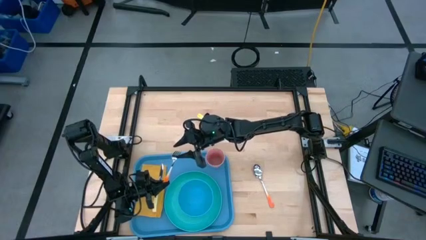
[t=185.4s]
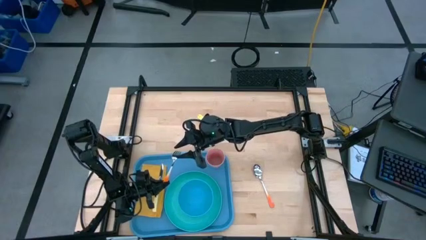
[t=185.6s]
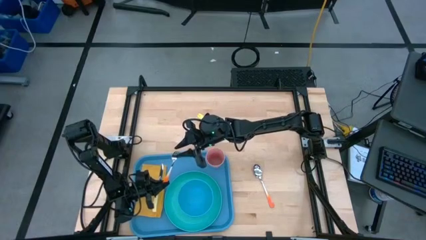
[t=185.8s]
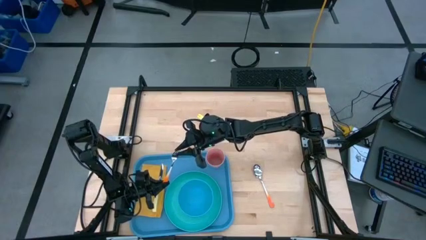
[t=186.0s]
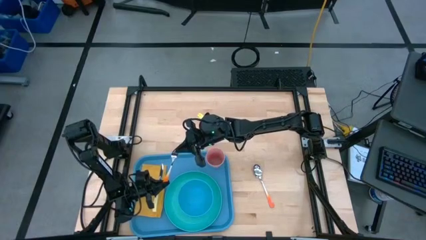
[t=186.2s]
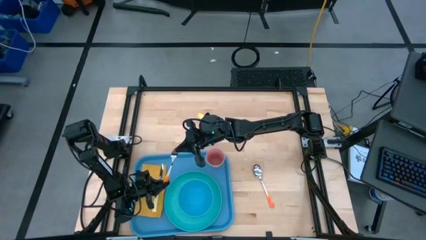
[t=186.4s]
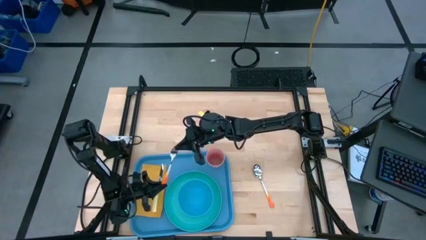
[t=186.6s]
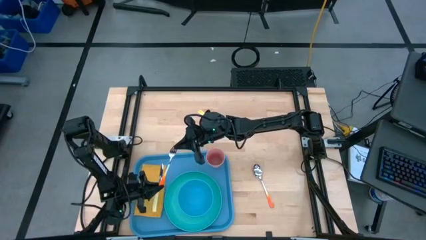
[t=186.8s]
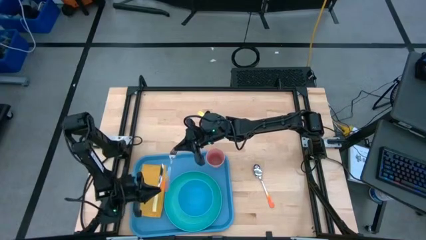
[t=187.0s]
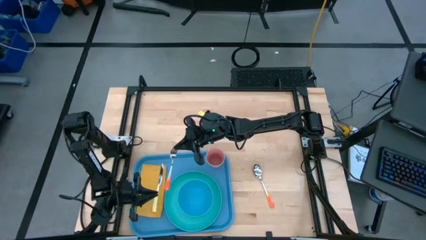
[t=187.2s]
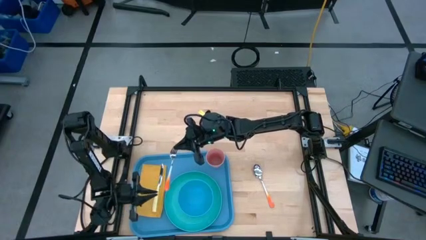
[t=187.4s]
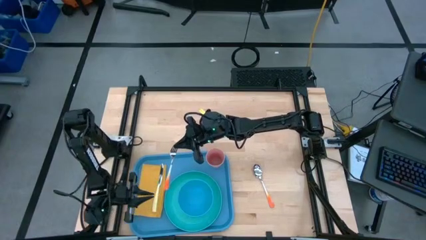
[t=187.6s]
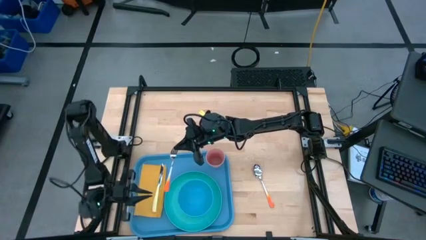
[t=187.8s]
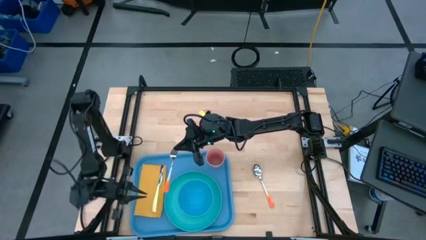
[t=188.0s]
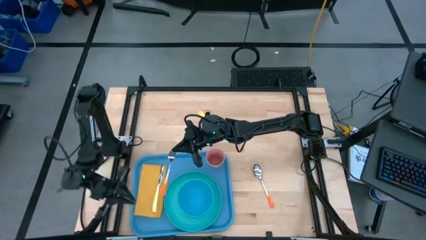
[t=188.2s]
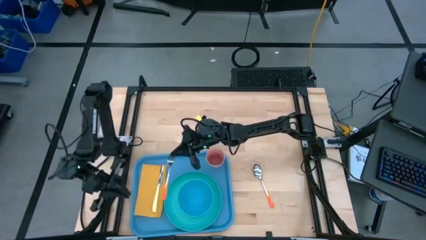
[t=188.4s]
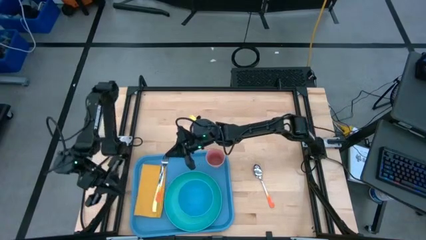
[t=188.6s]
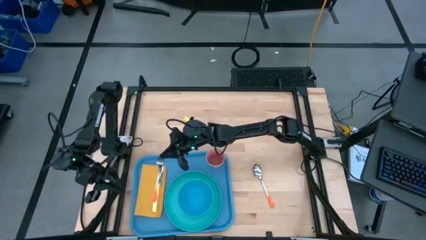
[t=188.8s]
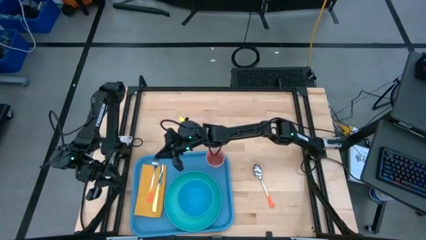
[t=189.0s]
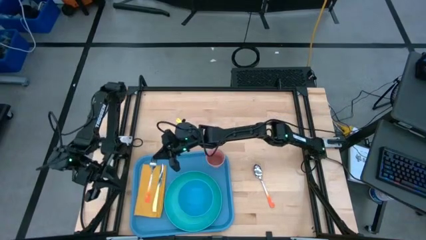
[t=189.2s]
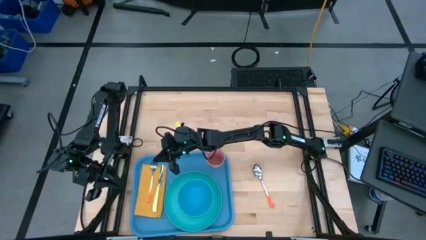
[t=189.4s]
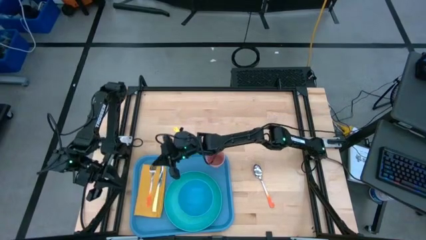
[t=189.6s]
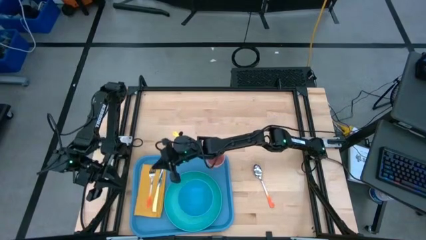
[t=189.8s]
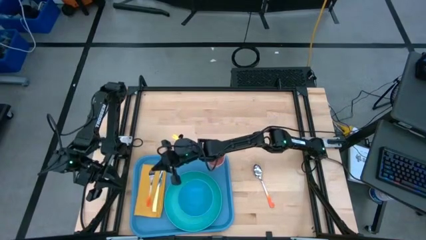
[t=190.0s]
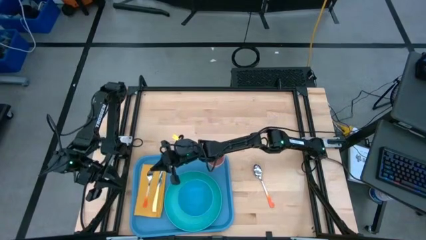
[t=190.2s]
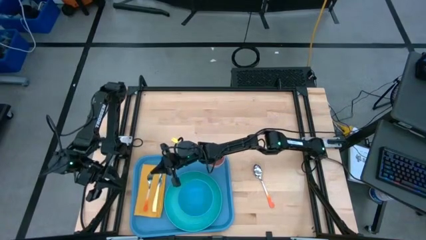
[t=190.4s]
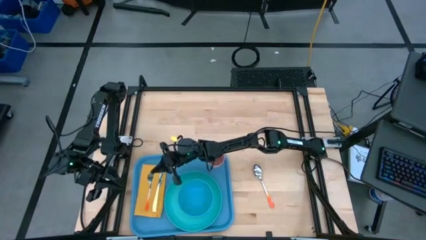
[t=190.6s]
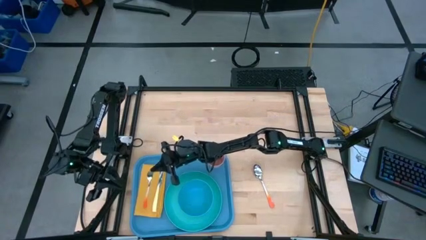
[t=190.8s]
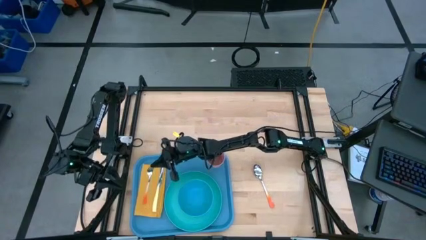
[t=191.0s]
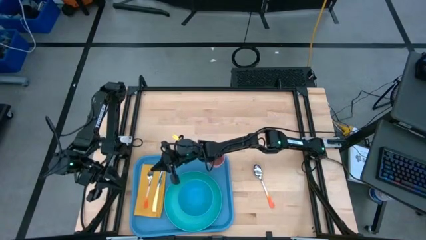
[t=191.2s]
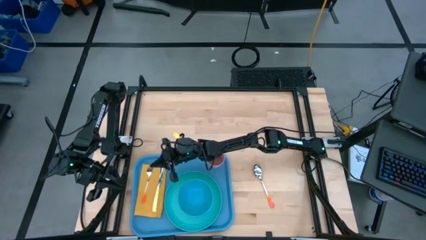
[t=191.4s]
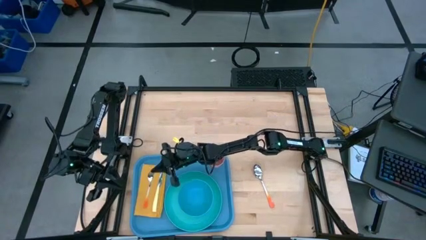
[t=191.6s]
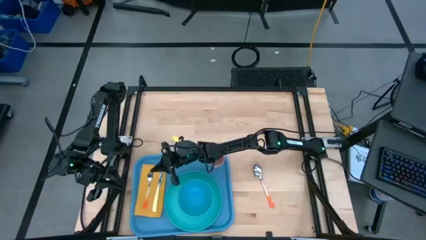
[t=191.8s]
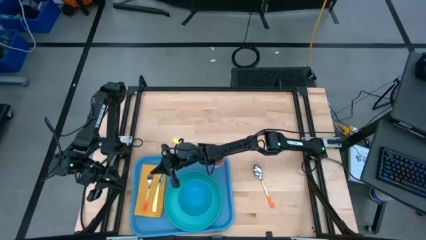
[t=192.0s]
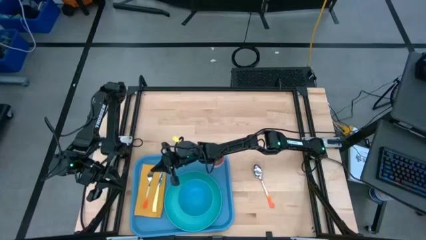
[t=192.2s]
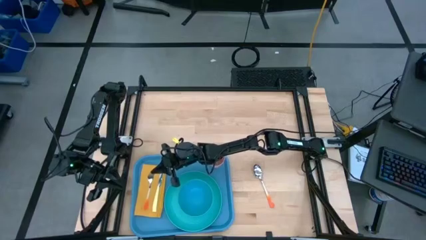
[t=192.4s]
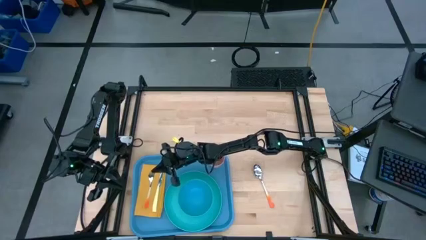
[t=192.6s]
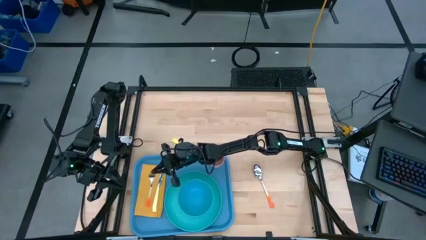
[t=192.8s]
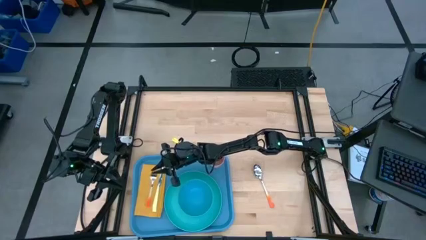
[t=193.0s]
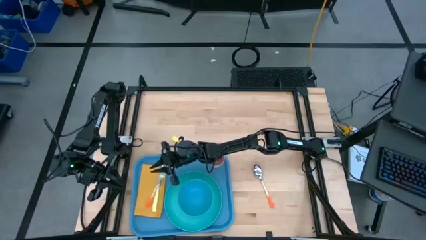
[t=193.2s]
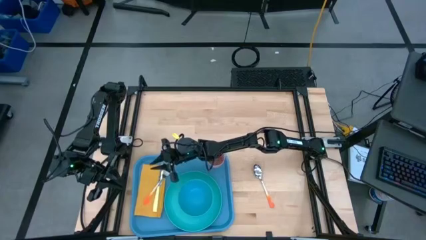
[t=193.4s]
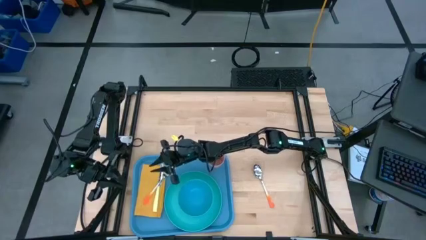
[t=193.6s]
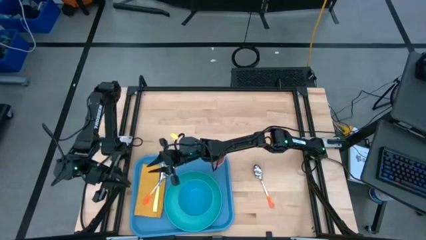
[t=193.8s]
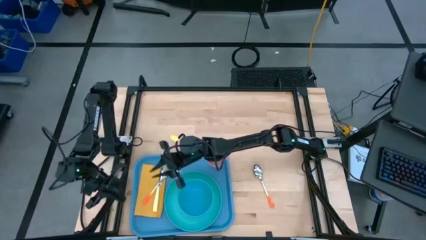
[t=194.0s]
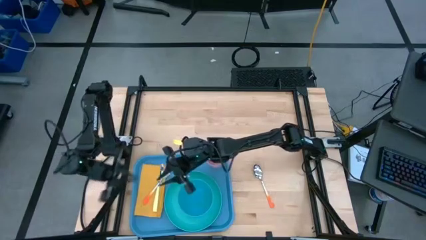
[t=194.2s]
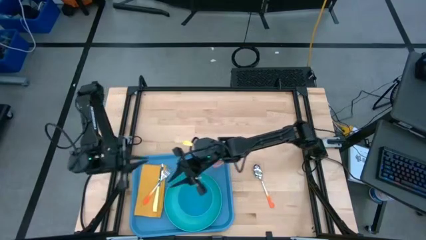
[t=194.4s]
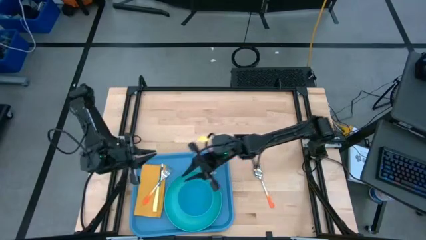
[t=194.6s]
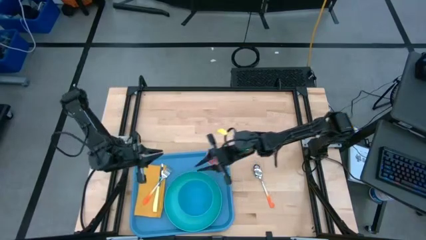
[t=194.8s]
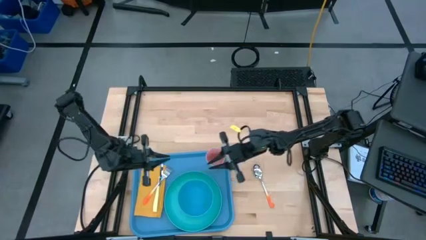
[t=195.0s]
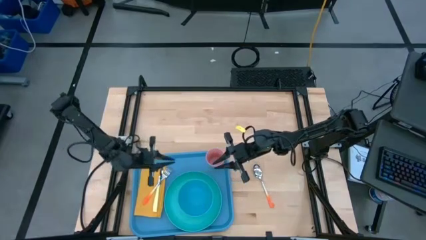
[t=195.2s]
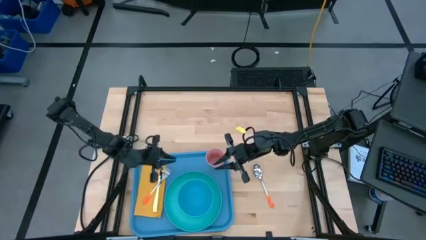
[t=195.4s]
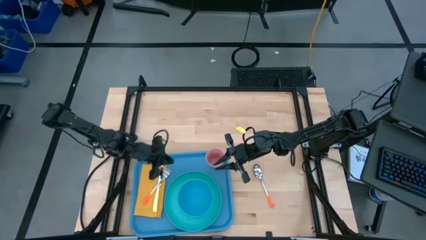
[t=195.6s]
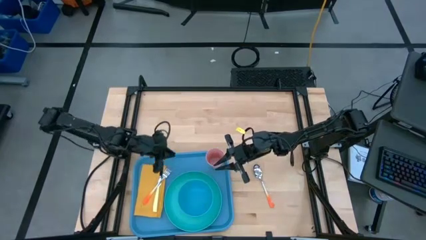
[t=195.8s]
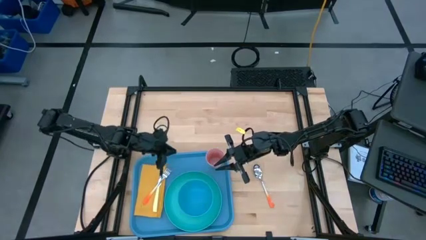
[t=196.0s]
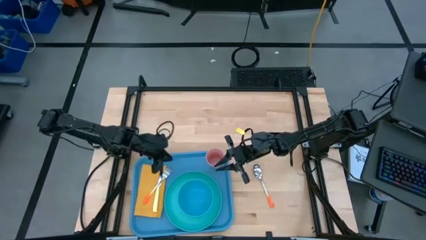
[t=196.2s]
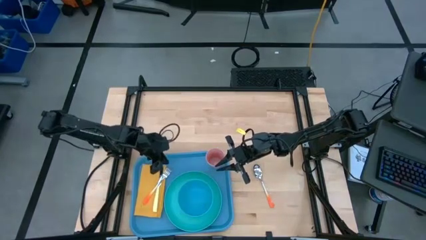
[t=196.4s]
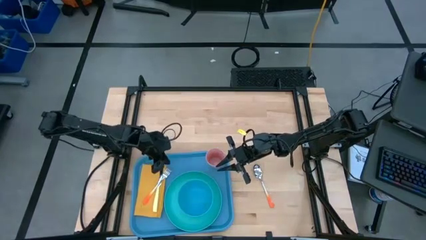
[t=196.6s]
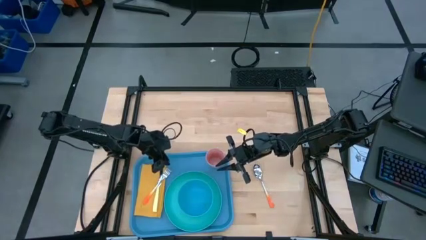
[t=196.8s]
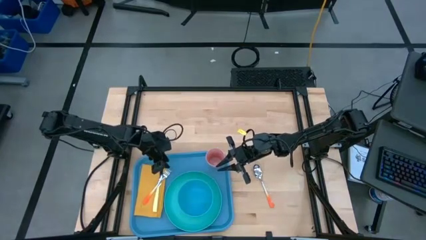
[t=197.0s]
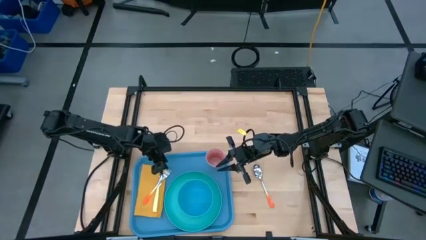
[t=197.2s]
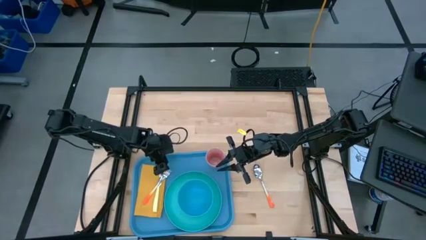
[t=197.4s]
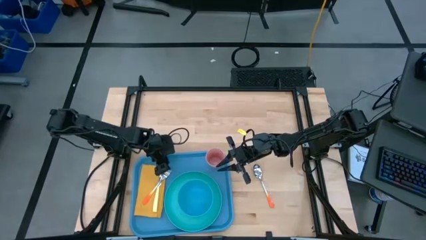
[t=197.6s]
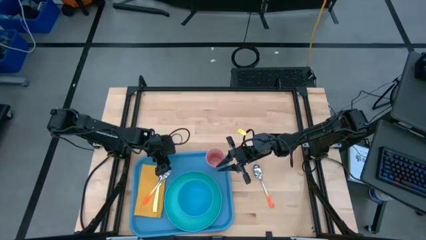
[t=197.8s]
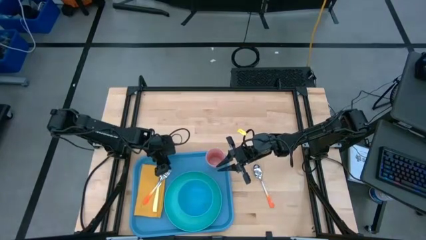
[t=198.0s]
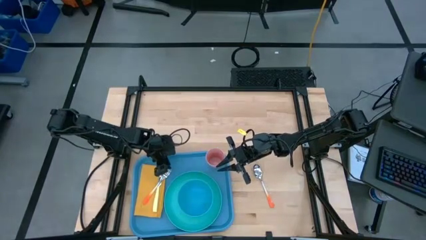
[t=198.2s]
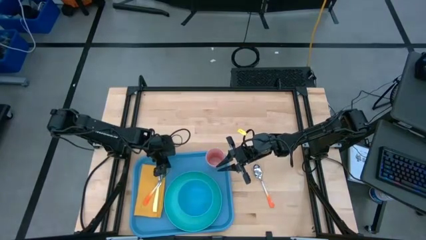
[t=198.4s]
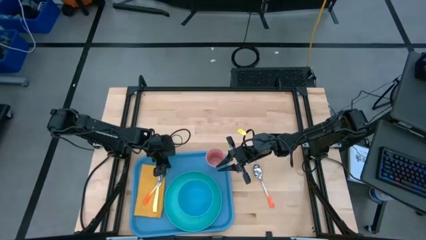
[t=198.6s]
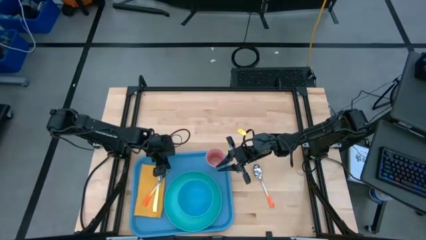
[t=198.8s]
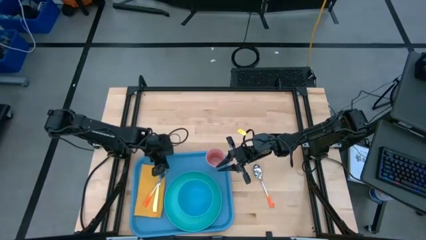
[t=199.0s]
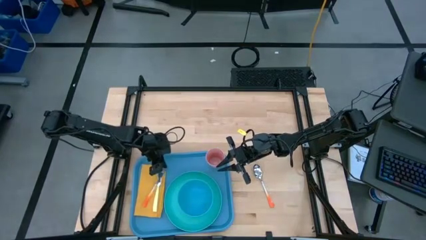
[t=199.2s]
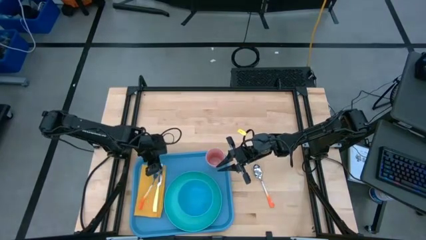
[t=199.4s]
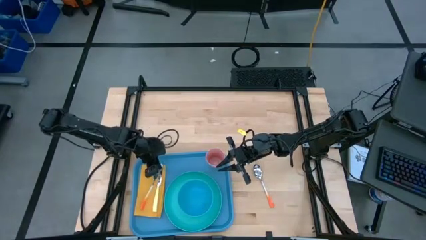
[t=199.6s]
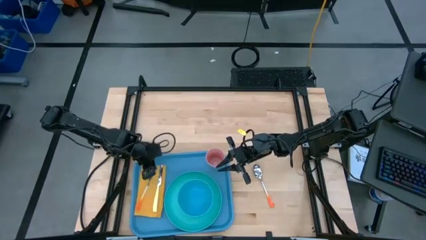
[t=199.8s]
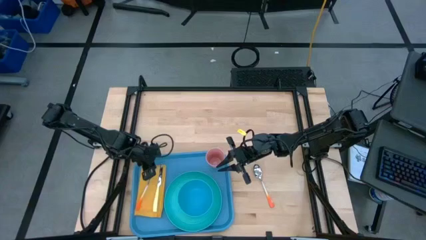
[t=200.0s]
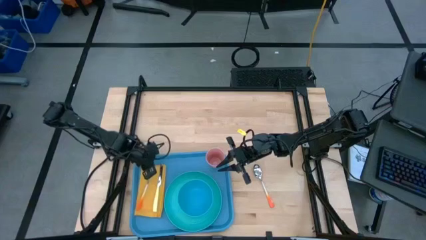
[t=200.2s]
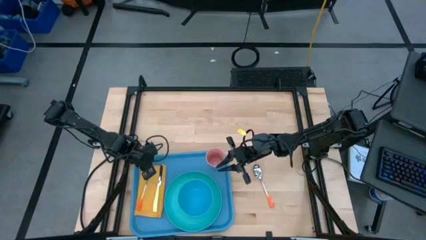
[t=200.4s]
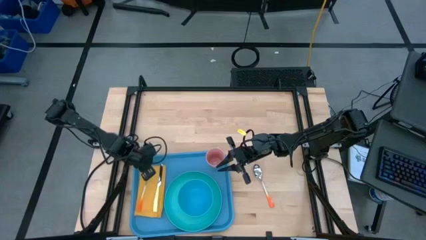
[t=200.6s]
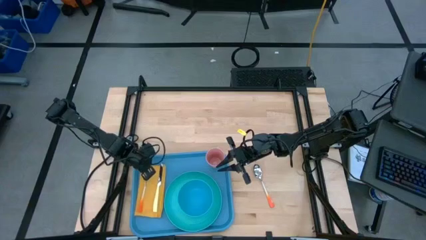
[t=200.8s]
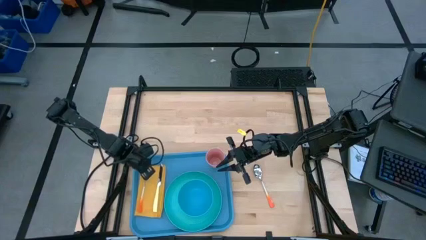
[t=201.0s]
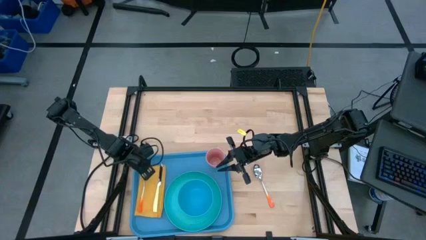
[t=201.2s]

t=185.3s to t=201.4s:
Task: Set up tray
Put the orange fork on top of the yellow table napkin to the left of the yellow table knife on the blue tray
